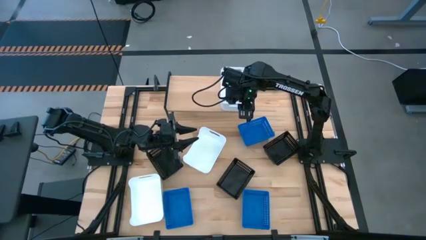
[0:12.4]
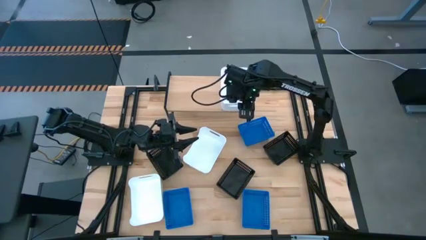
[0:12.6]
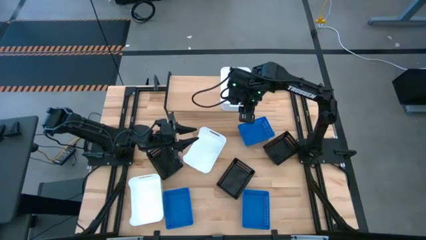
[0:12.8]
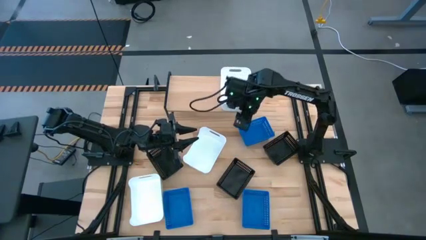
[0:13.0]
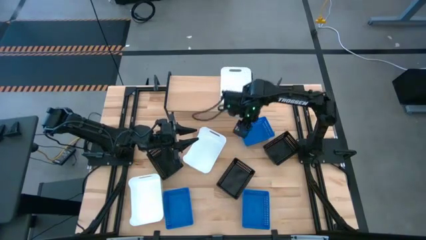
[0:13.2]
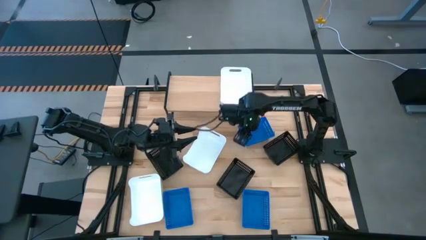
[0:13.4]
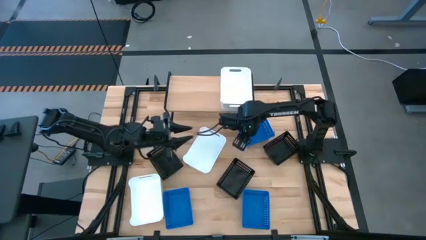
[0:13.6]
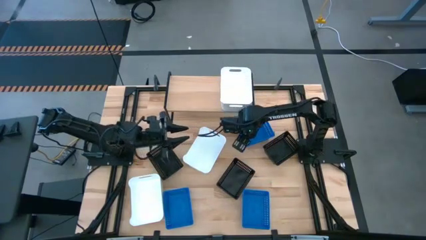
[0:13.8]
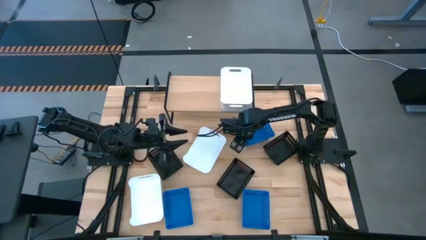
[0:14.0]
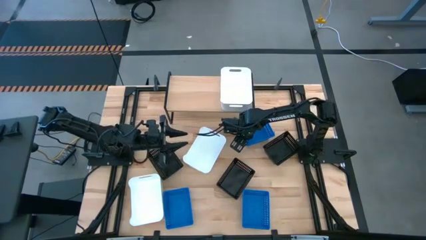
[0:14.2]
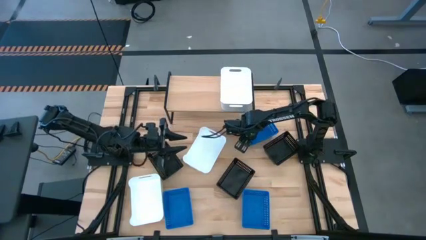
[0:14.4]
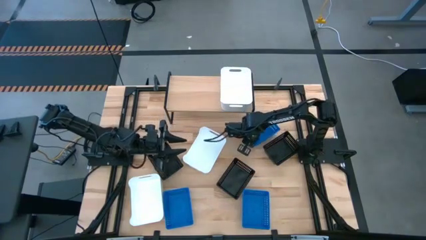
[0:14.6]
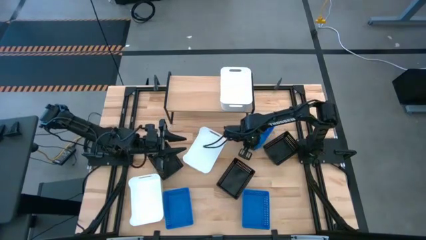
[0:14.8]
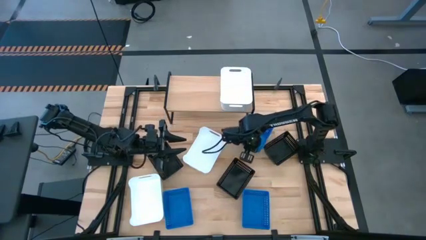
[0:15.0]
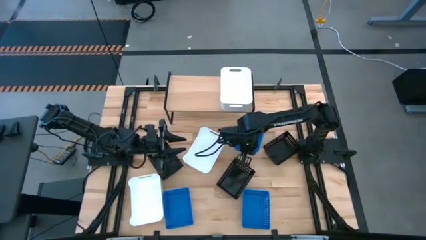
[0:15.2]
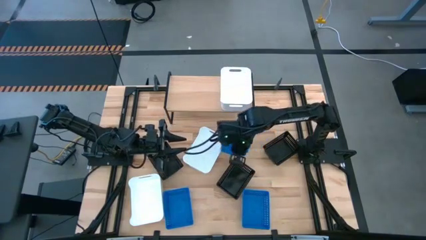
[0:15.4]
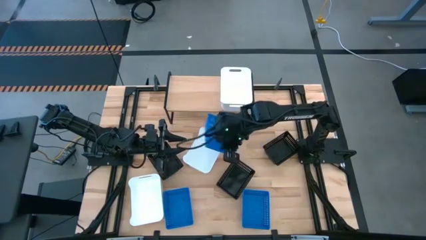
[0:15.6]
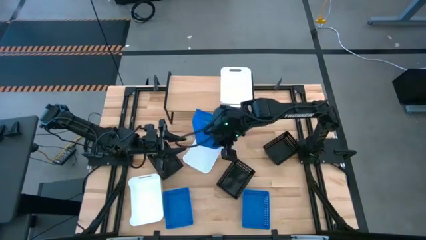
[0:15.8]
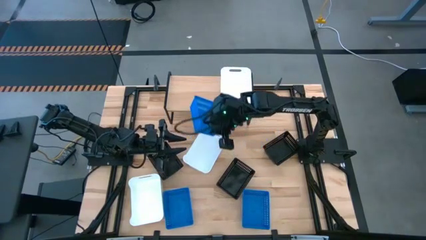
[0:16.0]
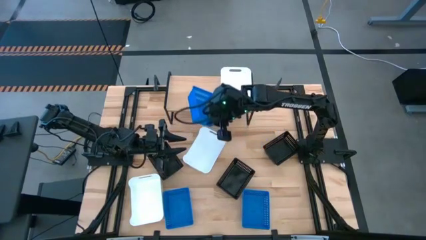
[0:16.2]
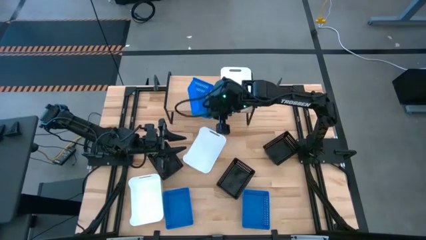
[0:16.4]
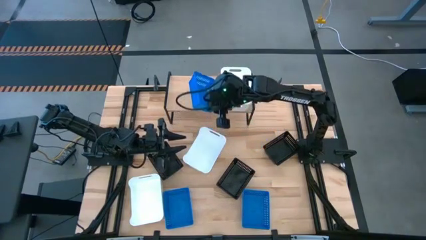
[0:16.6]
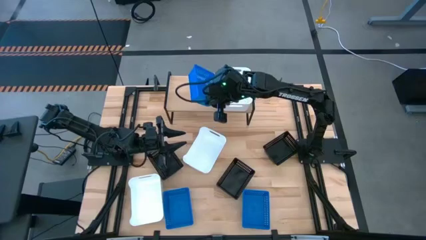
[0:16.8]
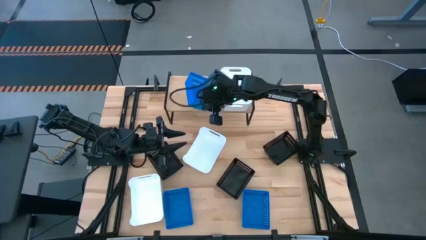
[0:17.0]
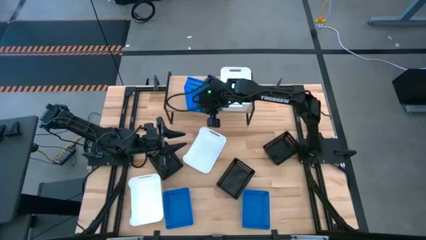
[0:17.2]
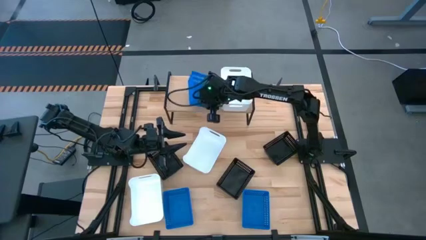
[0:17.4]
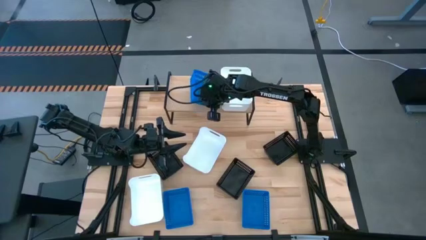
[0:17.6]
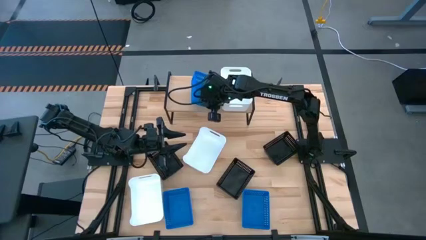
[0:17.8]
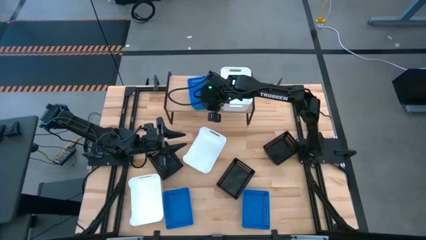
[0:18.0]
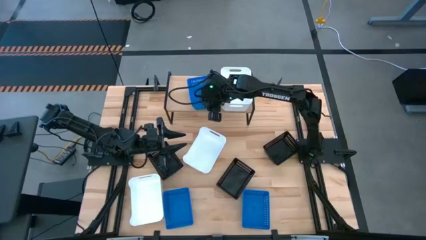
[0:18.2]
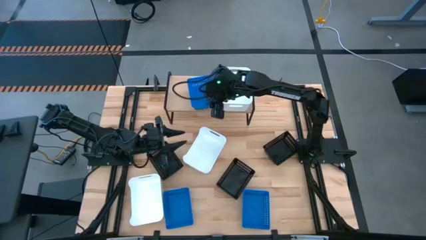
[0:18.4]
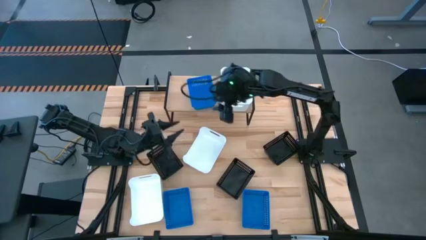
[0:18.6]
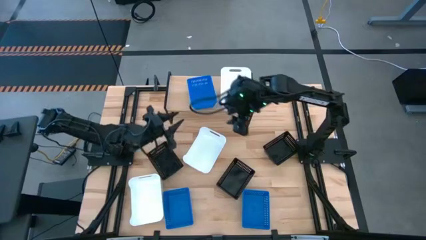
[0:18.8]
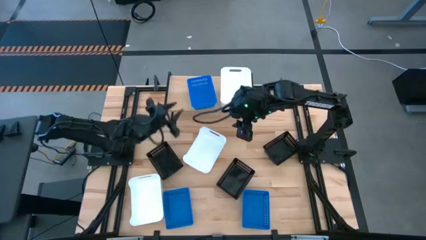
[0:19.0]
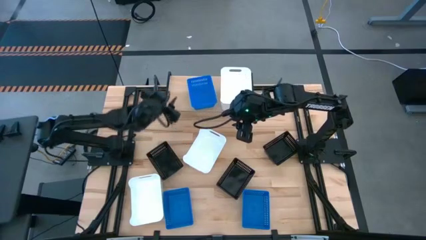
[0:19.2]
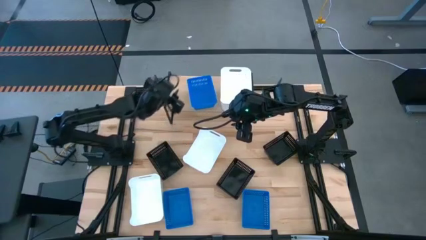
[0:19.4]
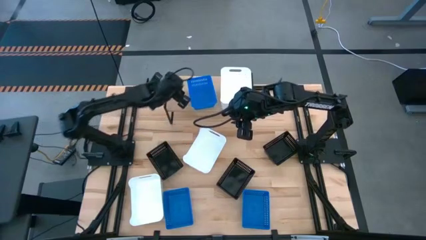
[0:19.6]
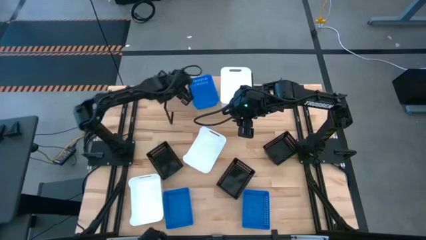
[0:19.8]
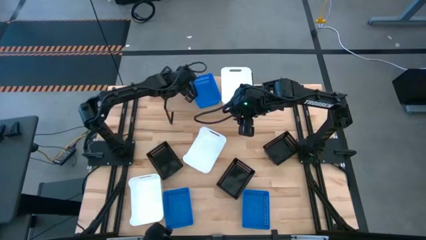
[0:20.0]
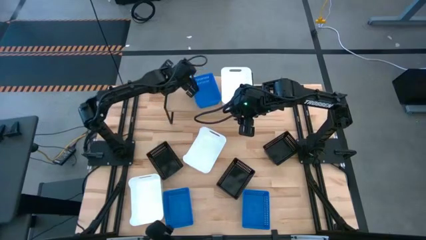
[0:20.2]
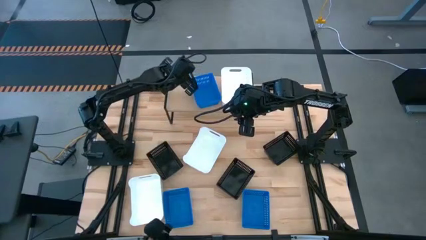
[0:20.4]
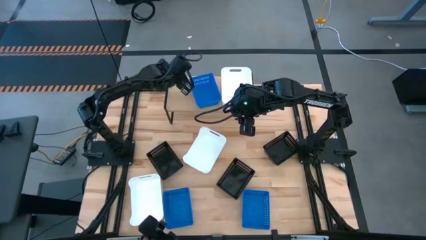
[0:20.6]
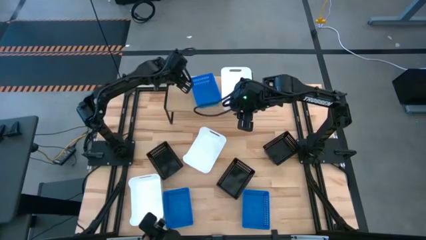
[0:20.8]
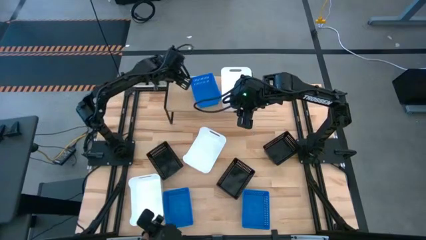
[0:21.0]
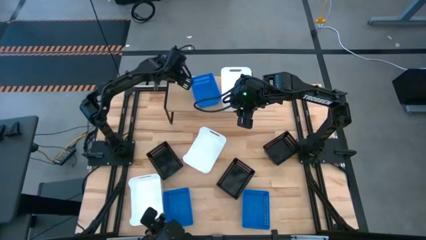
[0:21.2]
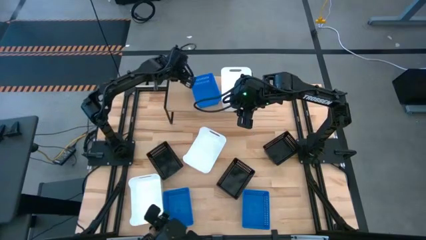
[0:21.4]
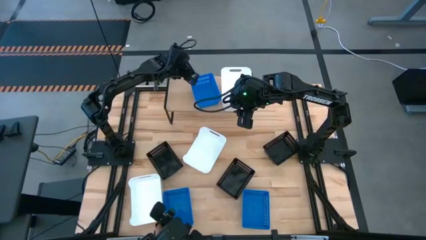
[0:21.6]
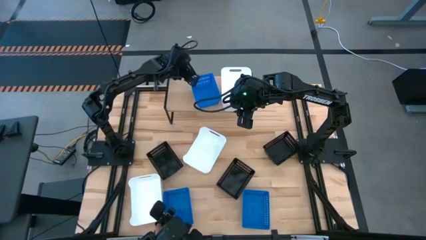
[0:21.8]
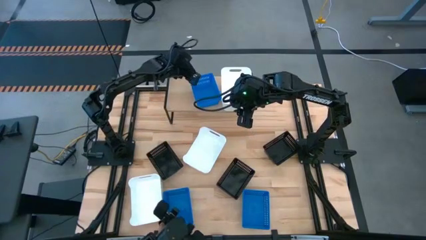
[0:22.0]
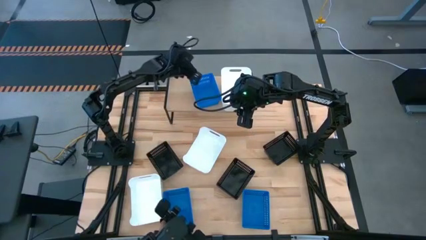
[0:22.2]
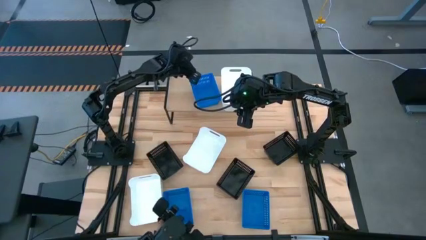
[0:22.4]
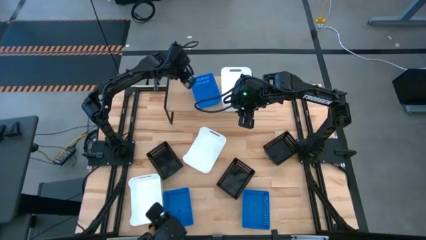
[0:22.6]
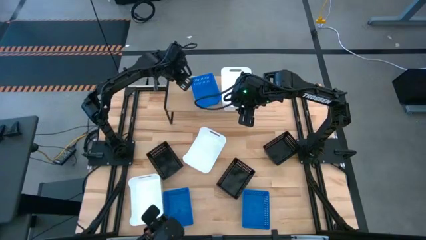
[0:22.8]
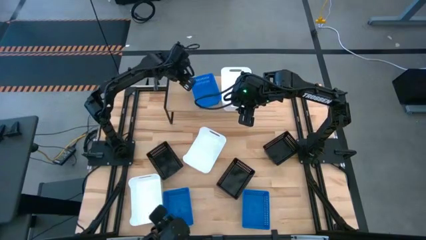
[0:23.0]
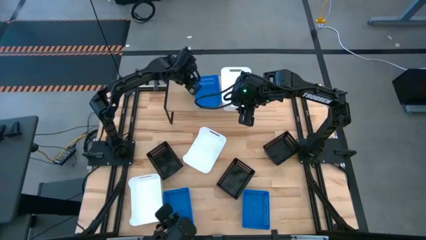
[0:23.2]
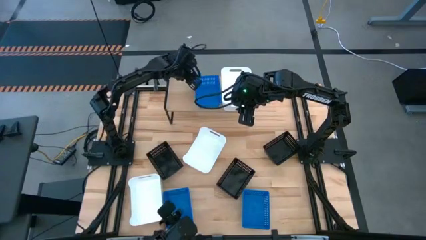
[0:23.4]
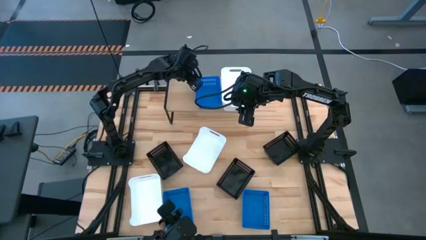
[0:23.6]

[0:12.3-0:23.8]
Task: Stack baskets on shelf by color
Put the top right blue bin on the shelf

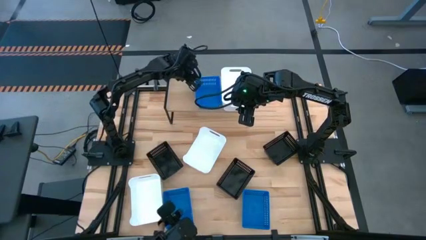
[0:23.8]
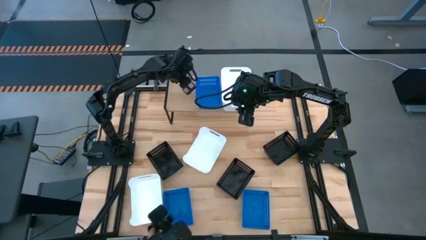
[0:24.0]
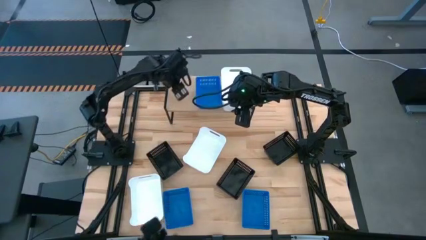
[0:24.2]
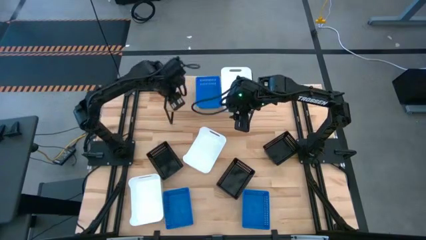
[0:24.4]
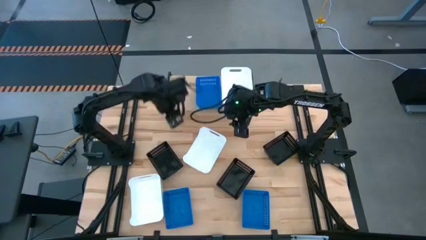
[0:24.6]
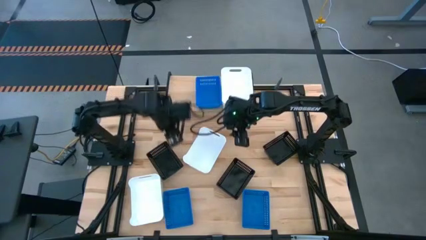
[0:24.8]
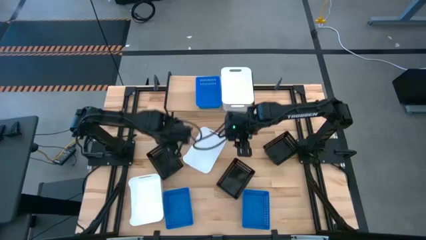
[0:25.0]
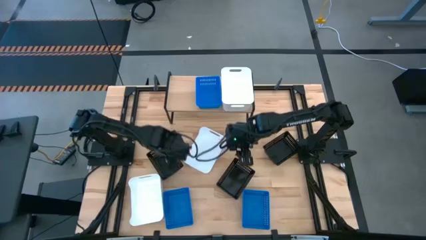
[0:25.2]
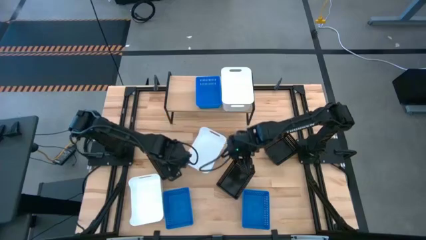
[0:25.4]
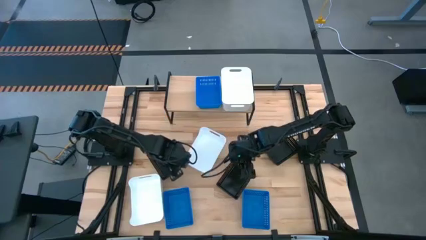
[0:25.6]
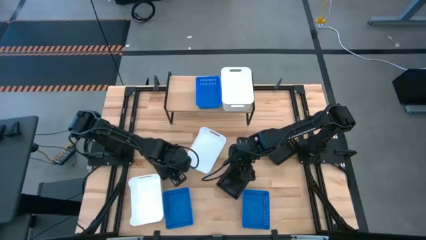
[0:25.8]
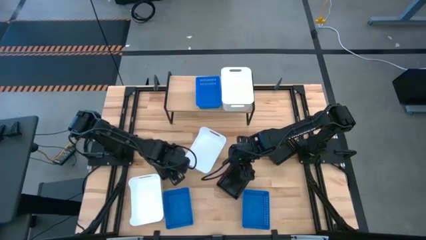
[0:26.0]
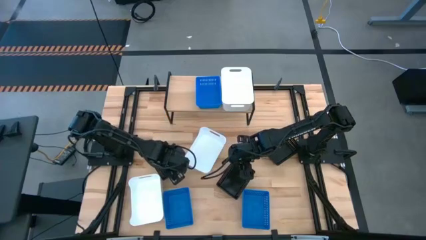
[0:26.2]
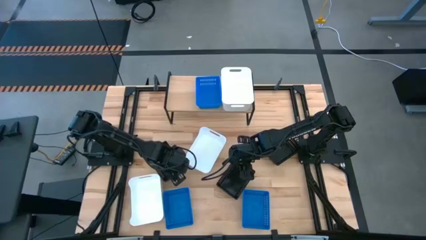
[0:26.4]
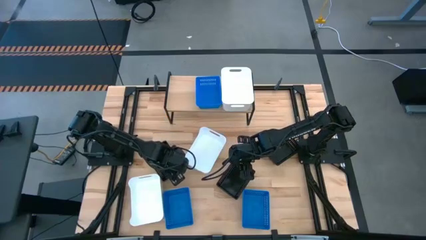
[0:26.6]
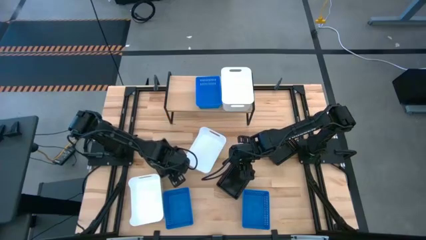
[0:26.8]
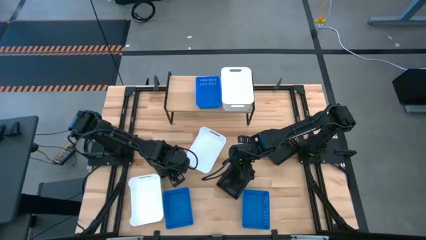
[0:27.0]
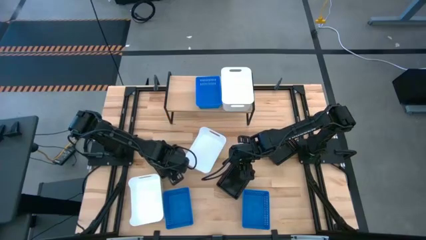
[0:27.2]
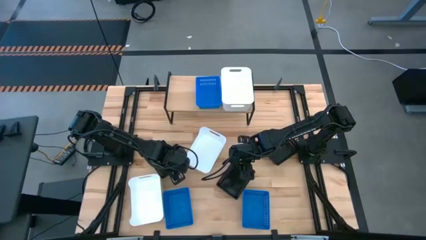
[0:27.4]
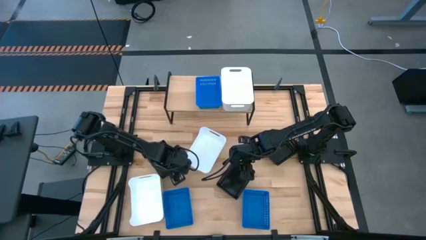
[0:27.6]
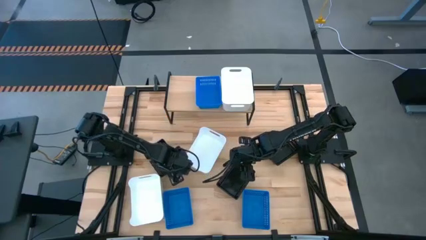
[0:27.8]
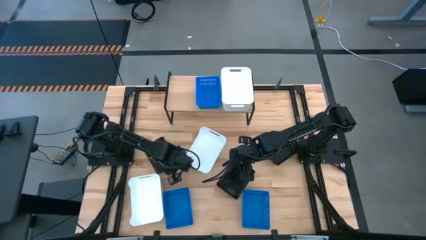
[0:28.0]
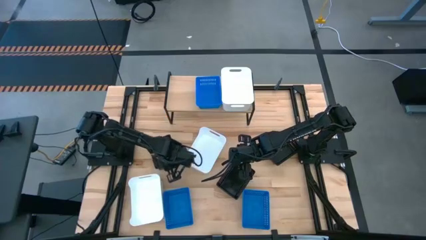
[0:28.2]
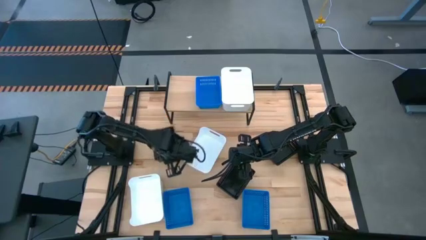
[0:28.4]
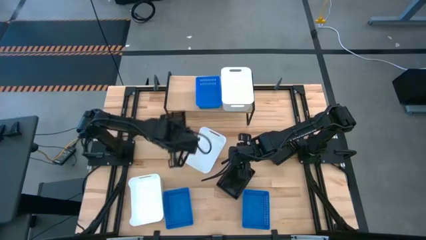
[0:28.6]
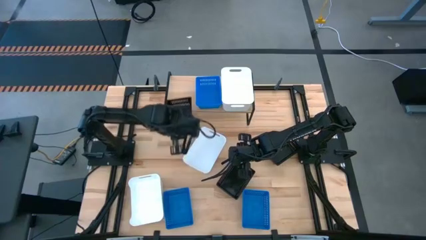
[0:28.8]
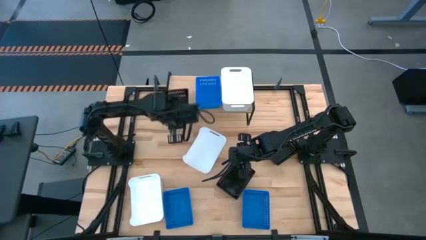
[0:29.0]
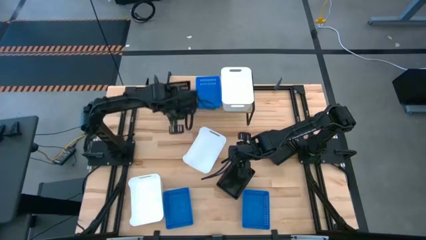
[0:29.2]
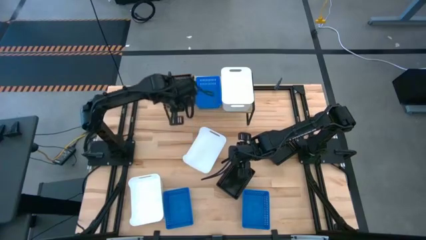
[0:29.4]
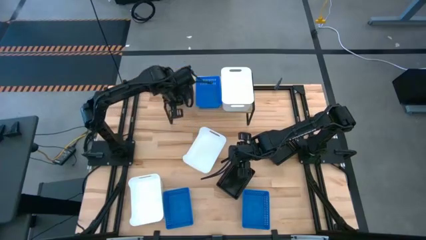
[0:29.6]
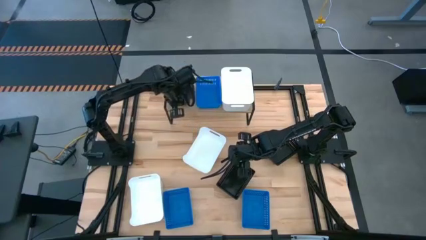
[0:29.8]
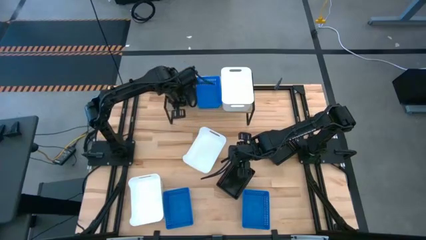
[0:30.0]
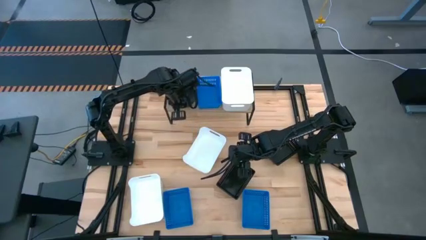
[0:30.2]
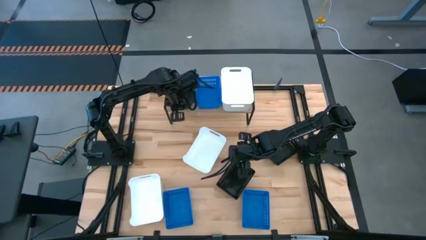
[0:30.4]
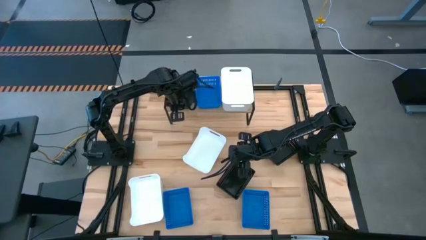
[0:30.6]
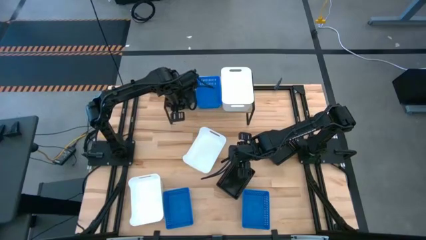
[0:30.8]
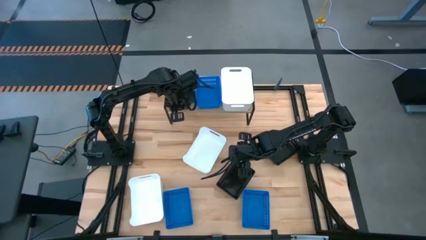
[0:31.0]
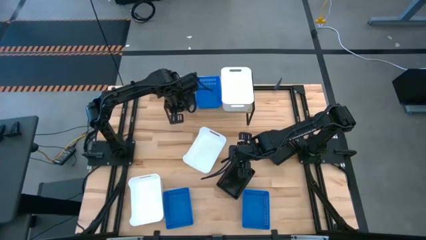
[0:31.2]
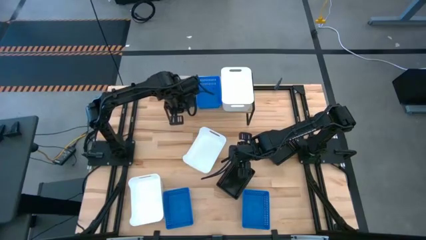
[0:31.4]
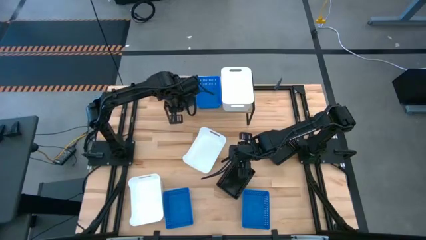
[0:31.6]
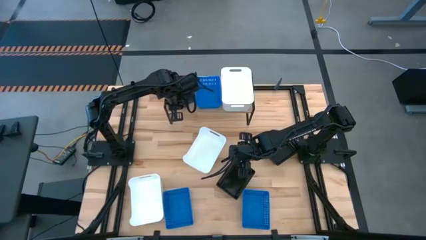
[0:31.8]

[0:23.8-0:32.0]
Put the left black bin on the shelf
